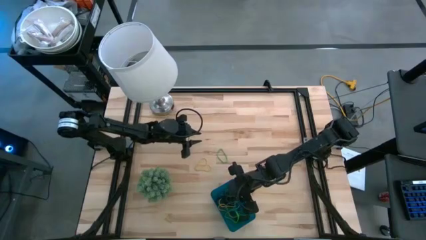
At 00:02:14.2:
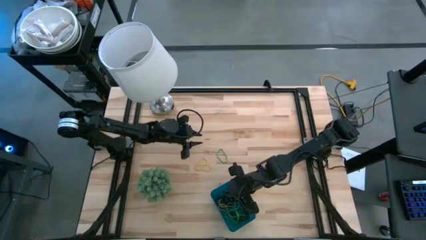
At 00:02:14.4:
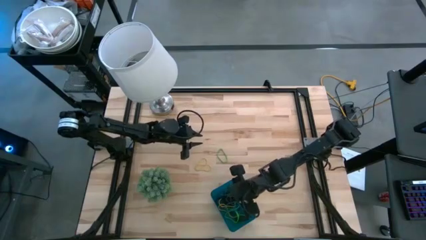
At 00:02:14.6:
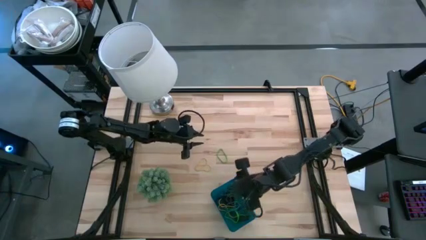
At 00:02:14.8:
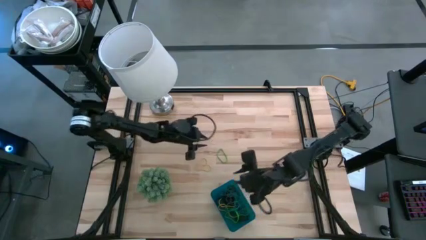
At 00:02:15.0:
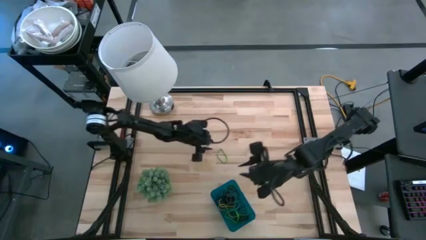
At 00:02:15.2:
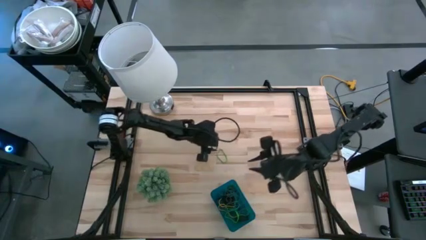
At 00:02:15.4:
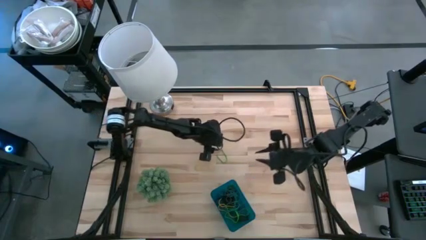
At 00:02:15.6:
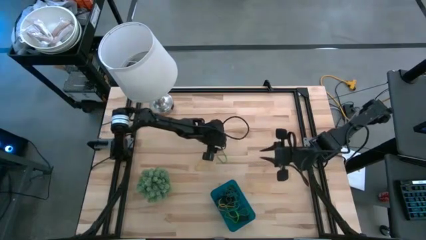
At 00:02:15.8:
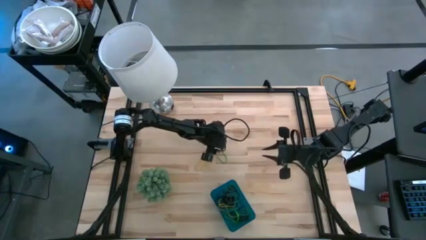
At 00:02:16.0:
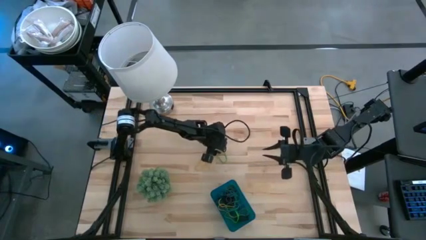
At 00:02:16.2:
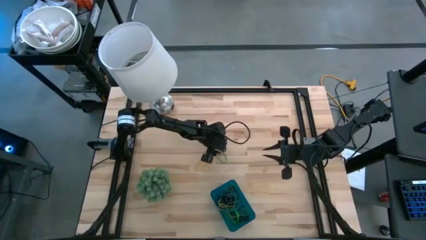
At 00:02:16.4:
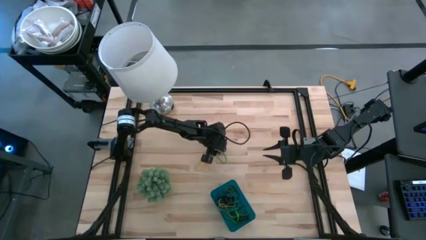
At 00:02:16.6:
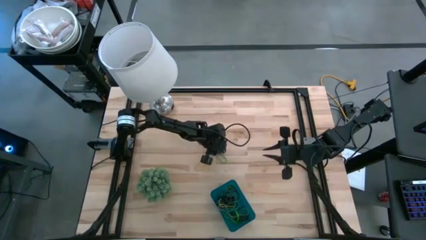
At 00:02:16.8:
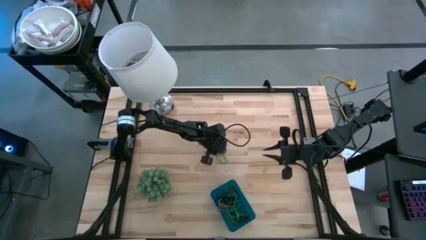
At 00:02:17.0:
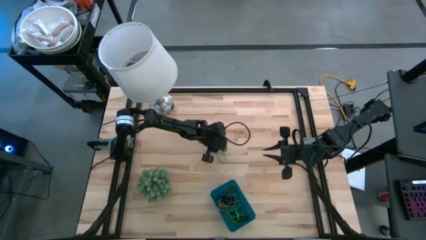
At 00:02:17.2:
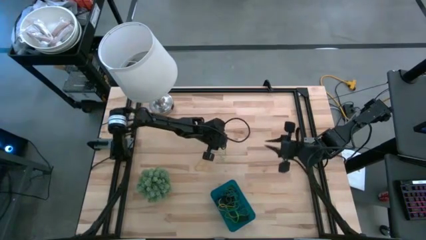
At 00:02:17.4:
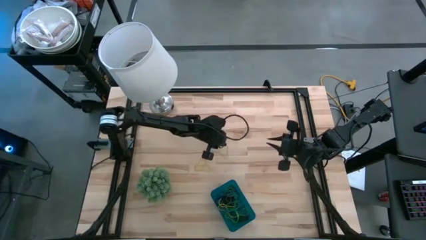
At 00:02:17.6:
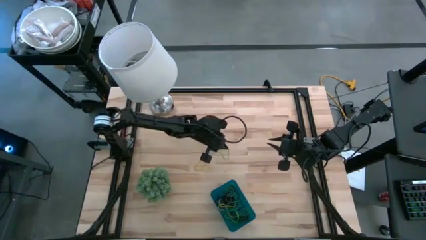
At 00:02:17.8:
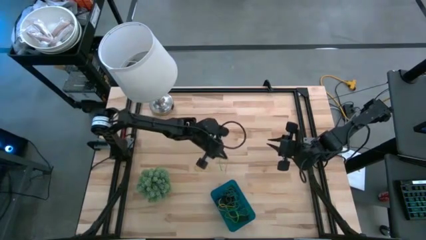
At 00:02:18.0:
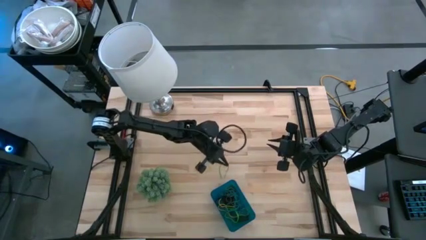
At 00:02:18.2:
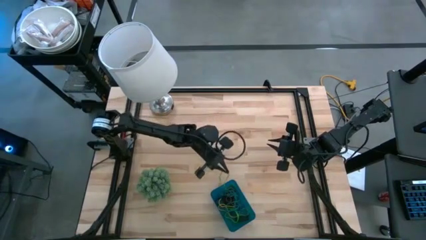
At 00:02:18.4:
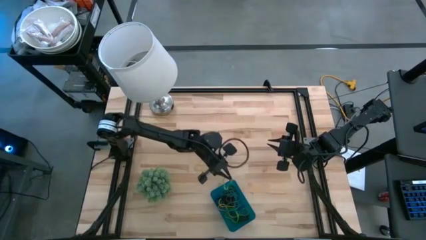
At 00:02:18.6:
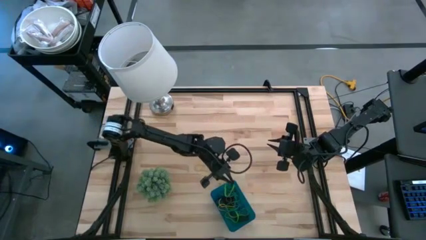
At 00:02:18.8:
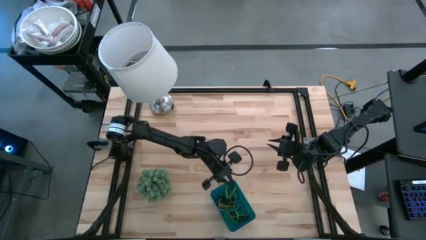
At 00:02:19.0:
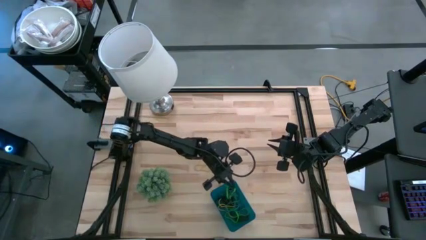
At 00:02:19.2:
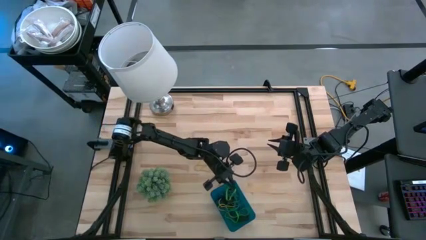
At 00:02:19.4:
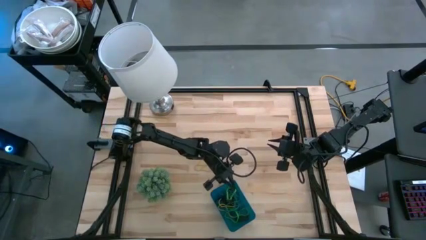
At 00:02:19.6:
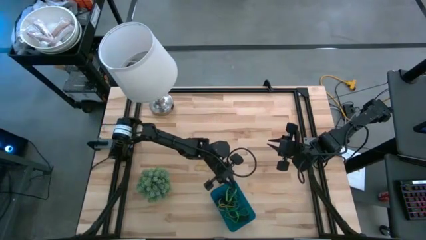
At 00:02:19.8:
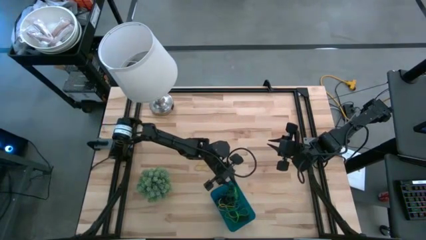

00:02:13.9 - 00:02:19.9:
Task: Pick and place rubber bands into bin
Put the green rubber band into the blue bin

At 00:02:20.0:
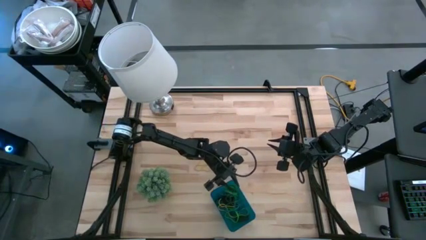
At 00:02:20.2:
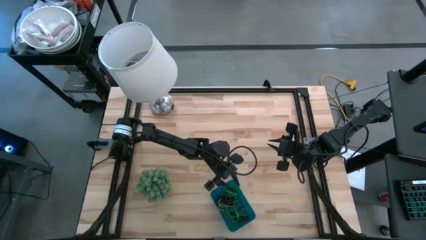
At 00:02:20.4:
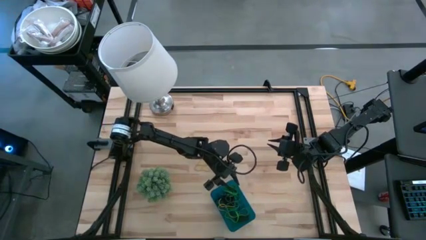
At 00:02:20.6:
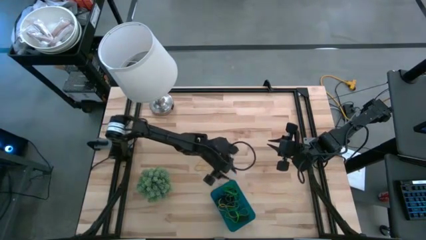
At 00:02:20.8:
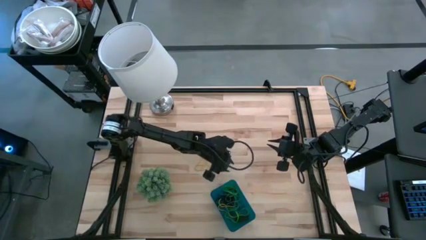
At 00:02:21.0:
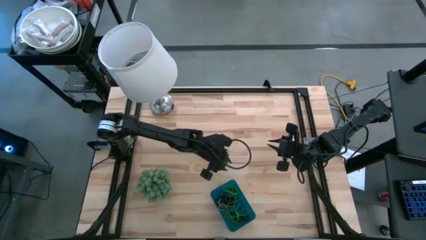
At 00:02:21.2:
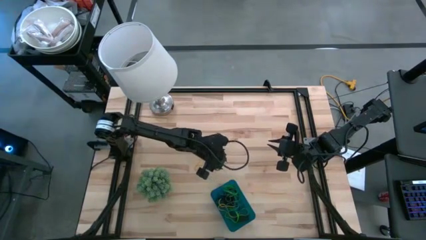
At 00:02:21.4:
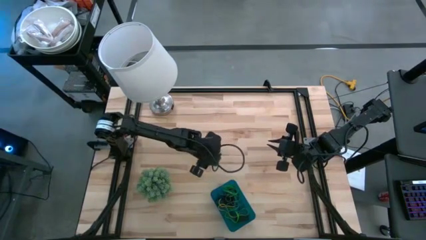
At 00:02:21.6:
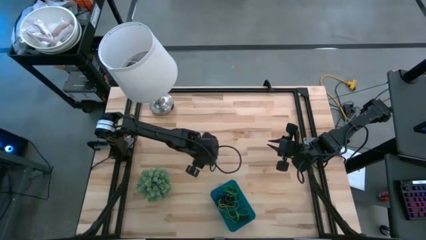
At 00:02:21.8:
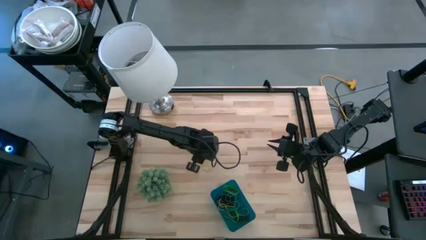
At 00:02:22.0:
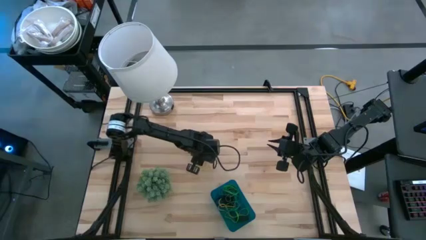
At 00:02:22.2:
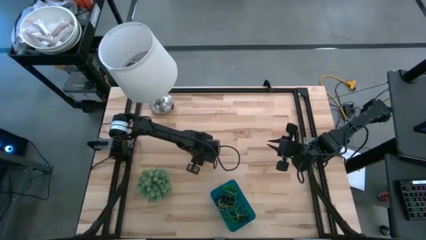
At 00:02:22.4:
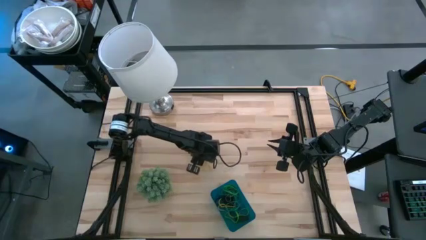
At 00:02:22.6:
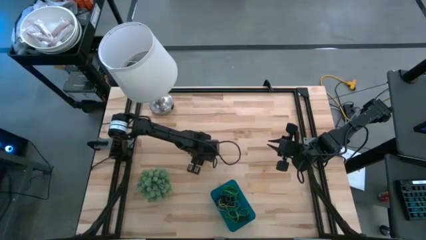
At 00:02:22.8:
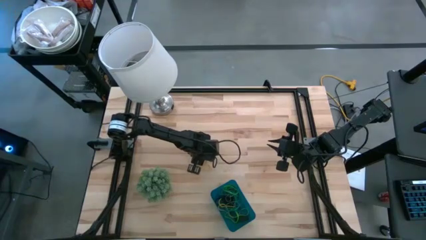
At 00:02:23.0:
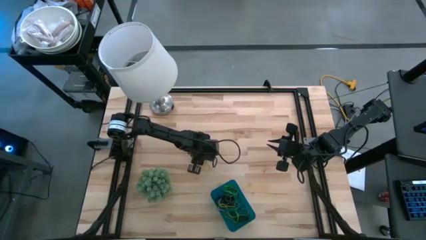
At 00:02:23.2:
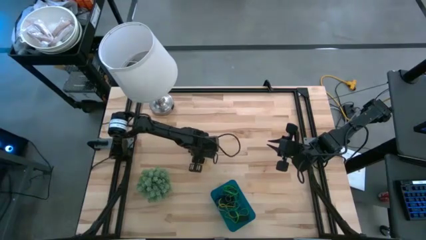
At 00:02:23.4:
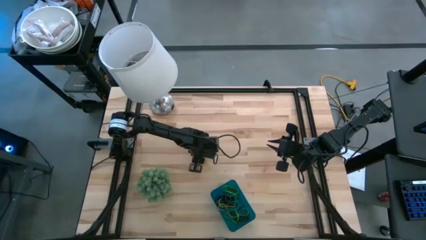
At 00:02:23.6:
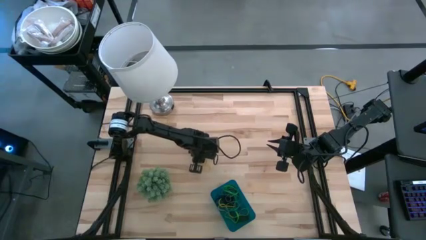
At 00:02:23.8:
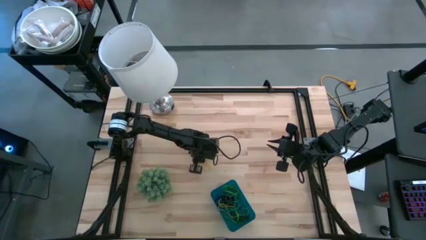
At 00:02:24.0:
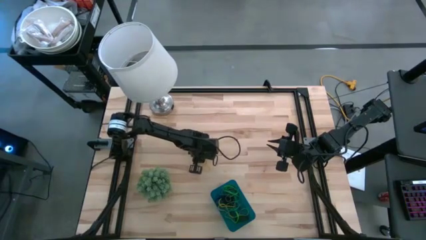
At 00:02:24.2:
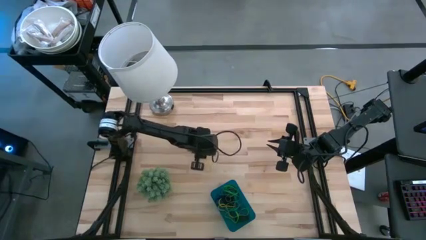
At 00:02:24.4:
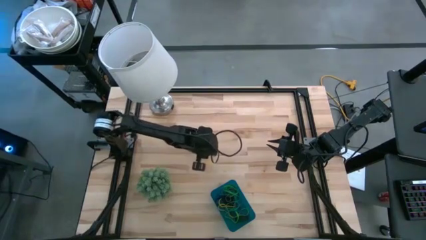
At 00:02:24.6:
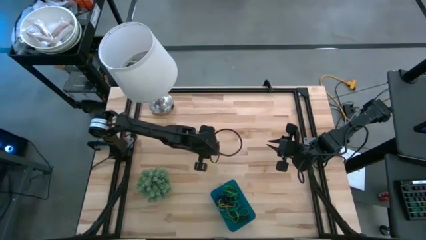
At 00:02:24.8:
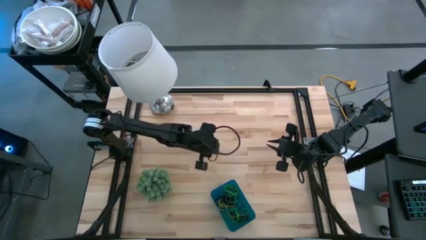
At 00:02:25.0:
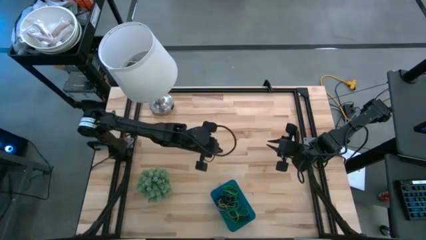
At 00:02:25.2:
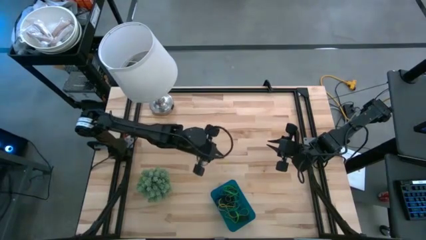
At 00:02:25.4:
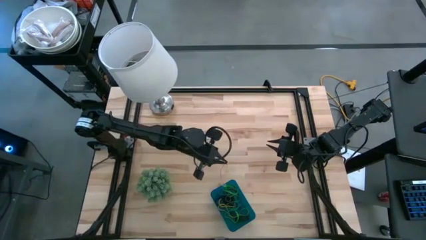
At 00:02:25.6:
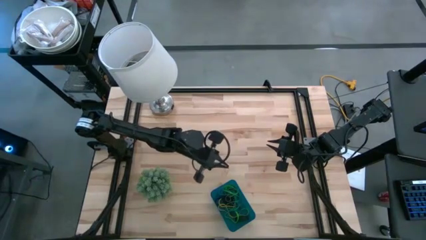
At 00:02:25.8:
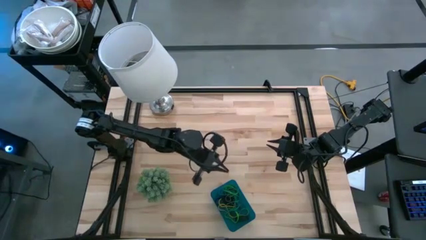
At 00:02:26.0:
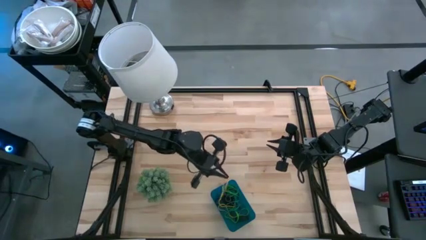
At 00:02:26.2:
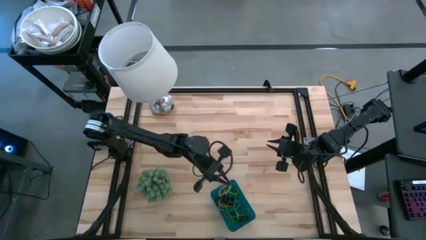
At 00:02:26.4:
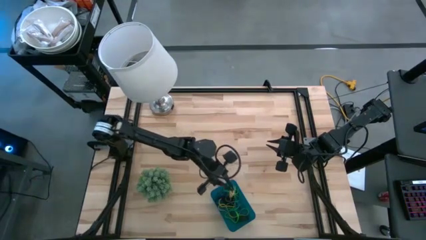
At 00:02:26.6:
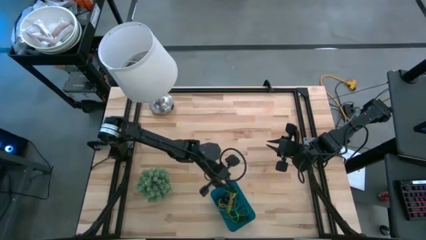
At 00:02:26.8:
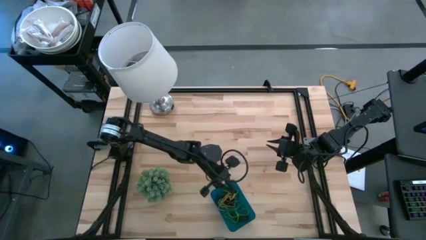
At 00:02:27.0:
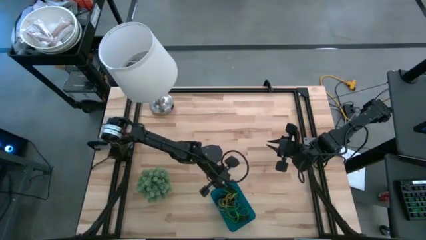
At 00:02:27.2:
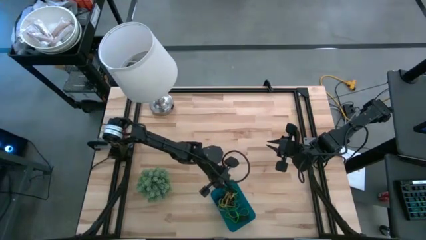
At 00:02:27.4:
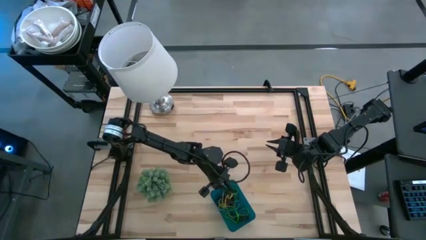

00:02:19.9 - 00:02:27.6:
Put the yellow rubber band into the blue bin

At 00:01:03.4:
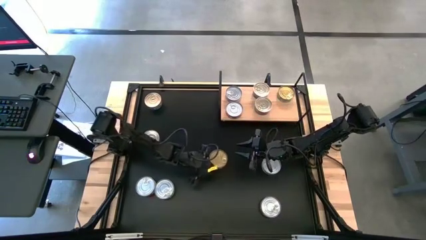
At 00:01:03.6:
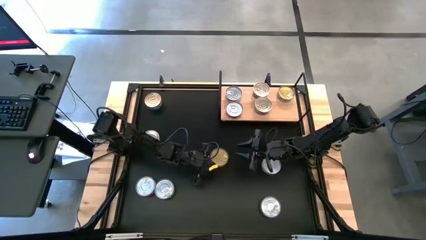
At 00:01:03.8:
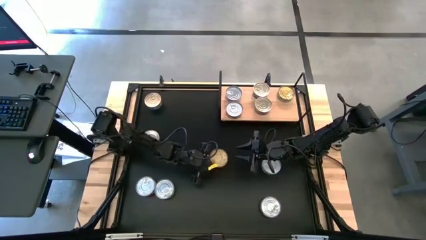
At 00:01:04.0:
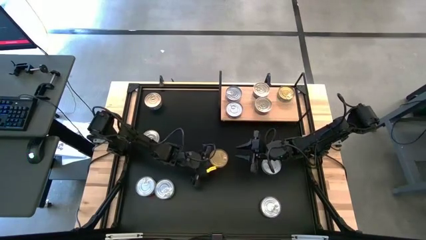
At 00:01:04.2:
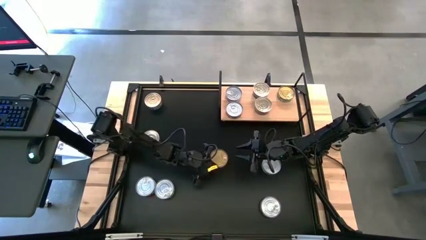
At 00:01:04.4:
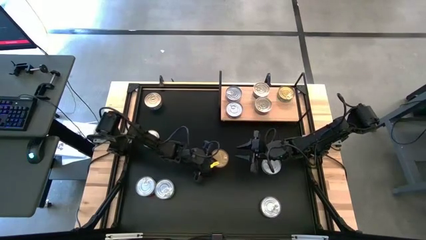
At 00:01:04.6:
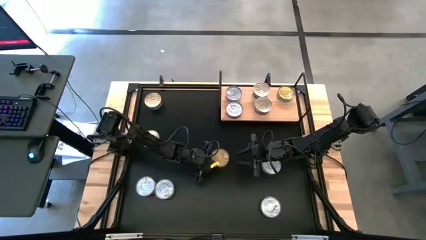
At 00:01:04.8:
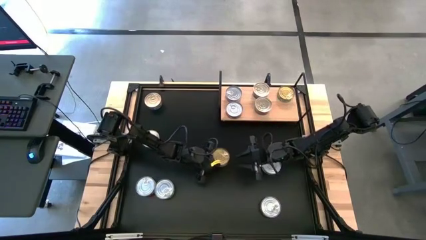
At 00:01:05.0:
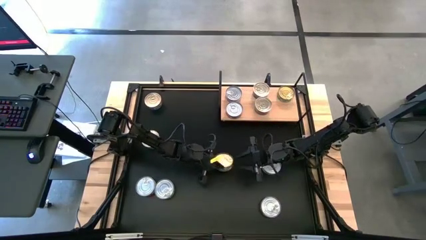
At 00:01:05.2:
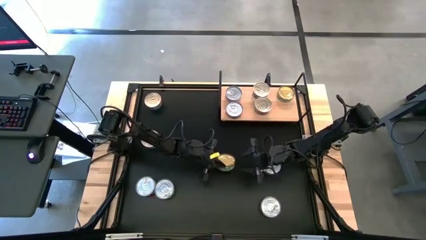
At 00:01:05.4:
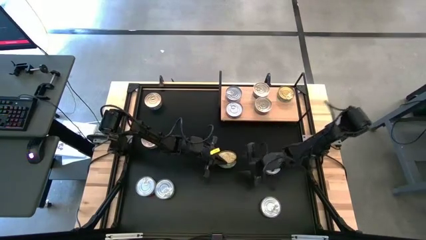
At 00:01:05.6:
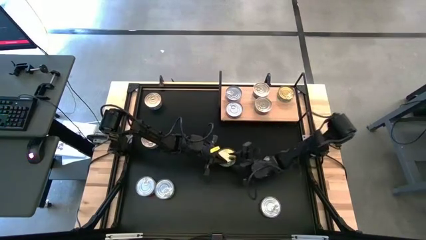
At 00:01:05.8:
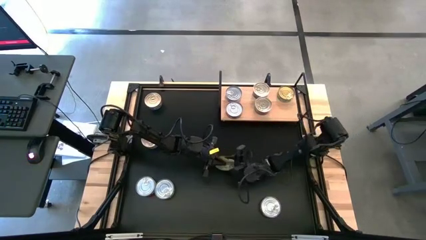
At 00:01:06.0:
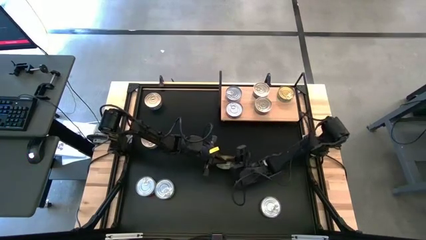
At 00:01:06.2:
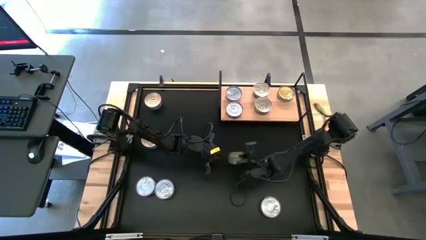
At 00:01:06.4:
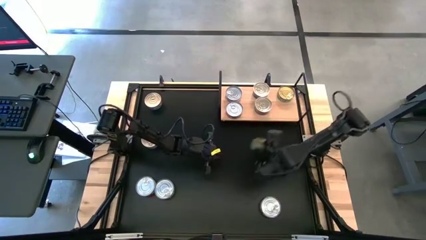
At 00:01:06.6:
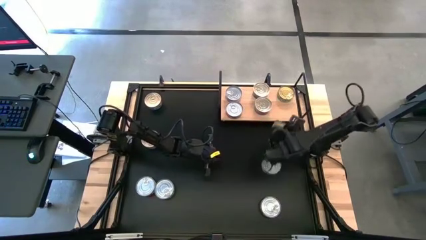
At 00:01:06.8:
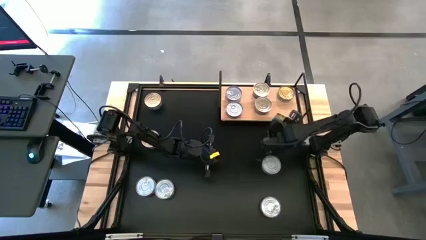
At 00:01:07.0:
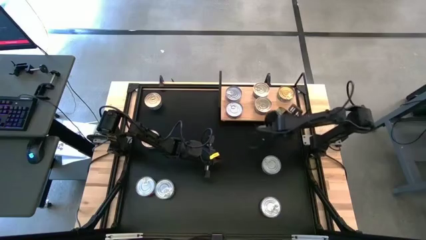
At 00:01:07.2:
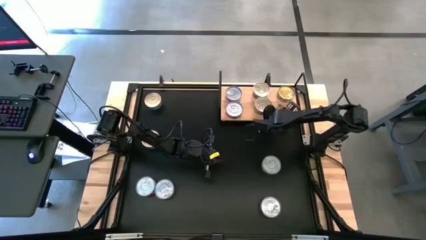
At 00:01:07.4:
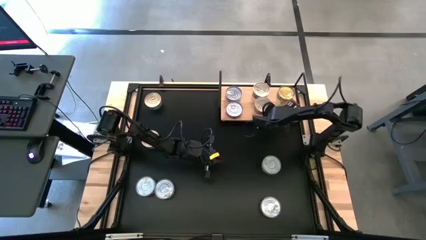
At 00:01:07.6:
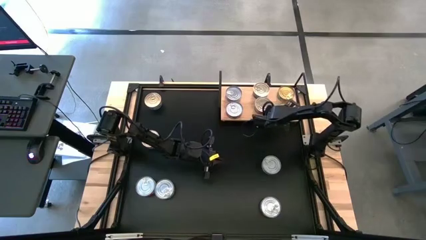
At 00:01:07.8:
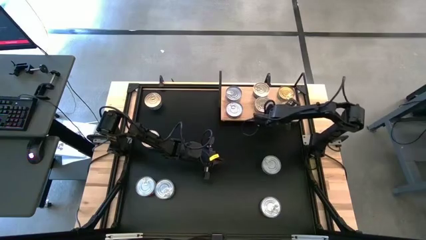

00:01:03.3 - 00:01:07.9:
Task: Stack canned seafood by type on shelf
Put the green tuna can on the shelf
